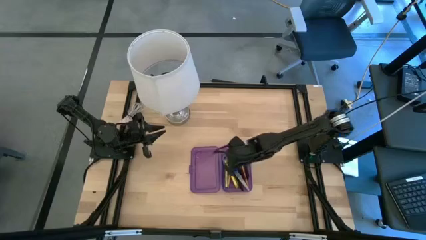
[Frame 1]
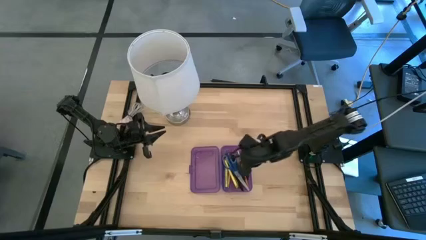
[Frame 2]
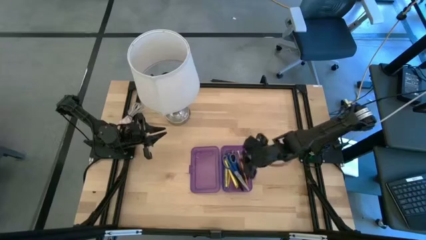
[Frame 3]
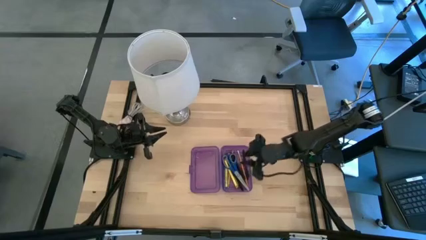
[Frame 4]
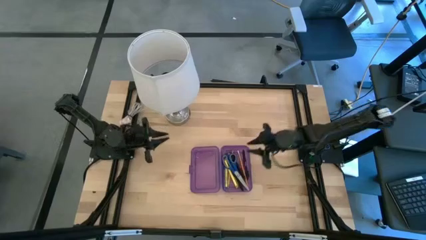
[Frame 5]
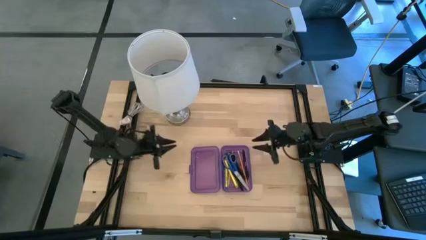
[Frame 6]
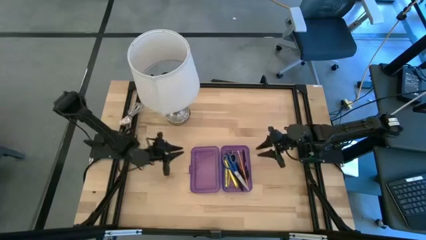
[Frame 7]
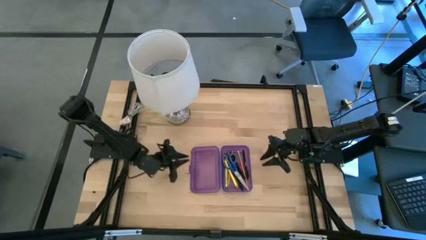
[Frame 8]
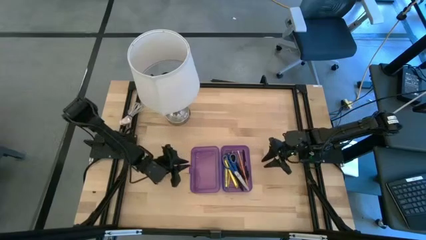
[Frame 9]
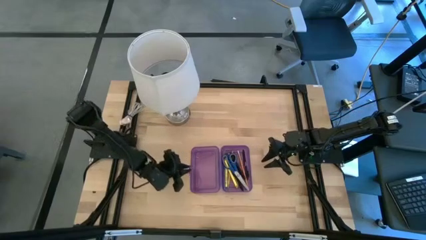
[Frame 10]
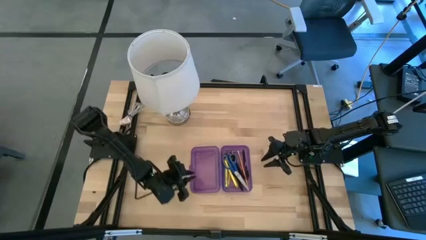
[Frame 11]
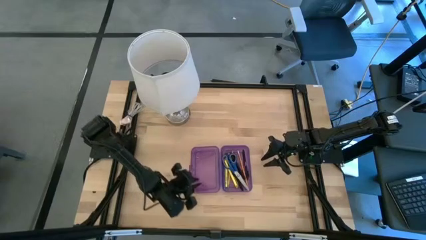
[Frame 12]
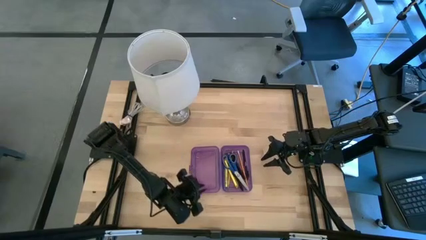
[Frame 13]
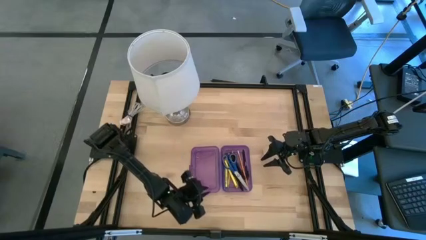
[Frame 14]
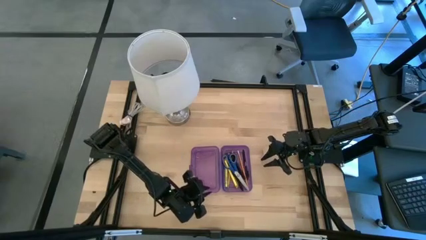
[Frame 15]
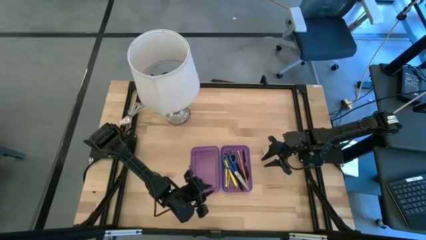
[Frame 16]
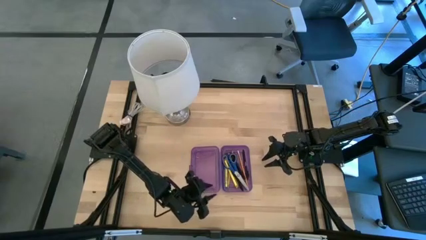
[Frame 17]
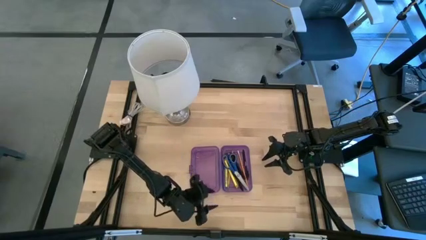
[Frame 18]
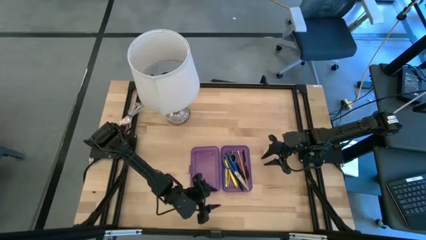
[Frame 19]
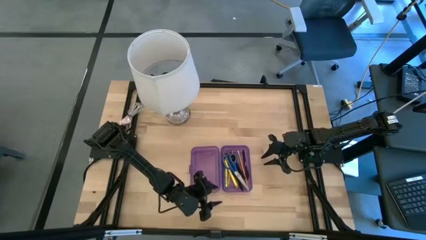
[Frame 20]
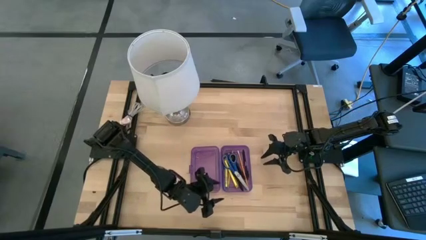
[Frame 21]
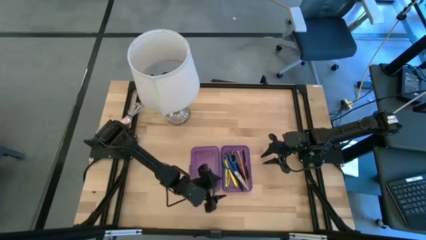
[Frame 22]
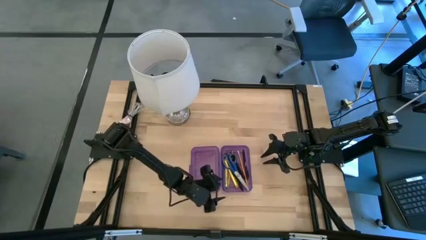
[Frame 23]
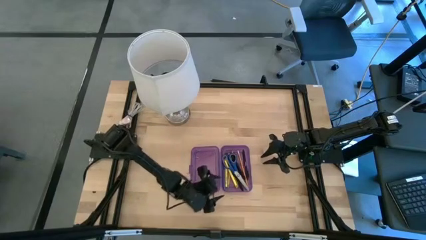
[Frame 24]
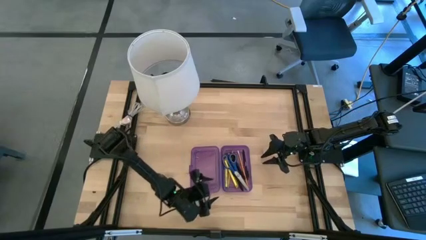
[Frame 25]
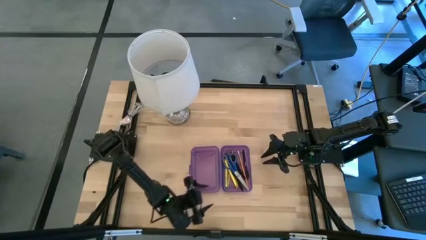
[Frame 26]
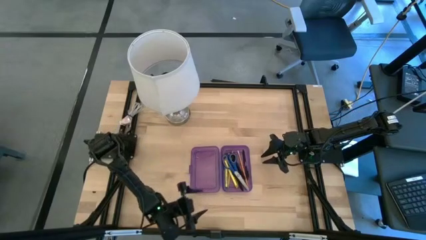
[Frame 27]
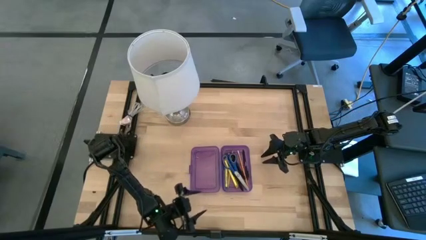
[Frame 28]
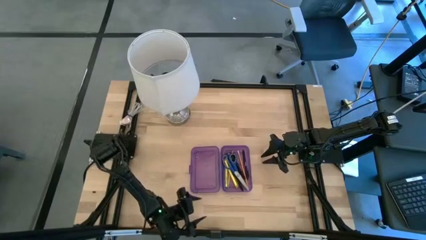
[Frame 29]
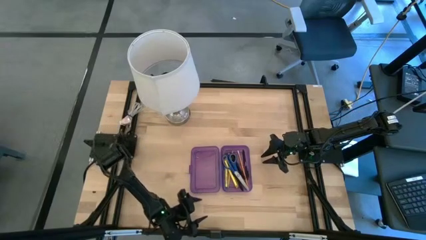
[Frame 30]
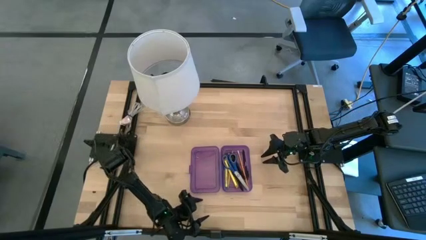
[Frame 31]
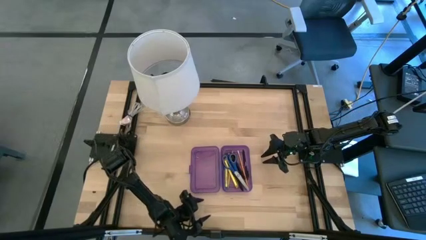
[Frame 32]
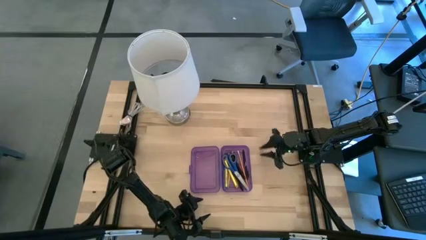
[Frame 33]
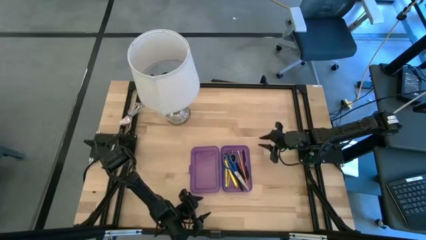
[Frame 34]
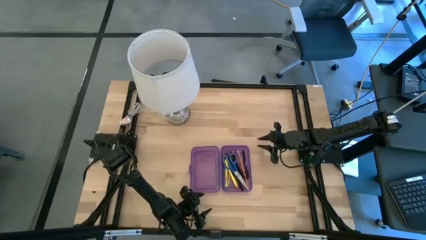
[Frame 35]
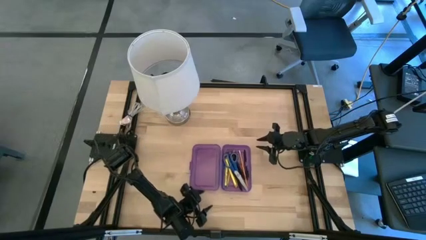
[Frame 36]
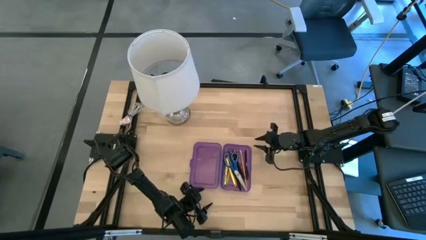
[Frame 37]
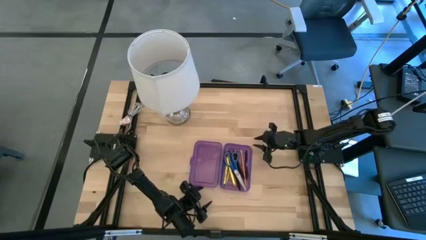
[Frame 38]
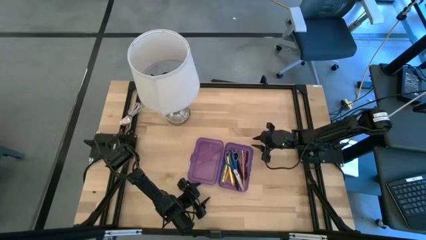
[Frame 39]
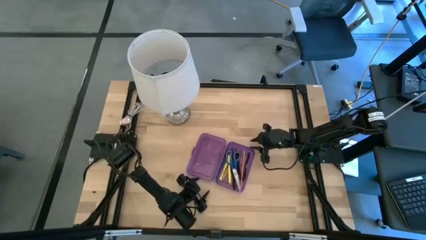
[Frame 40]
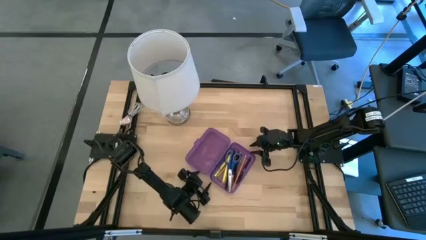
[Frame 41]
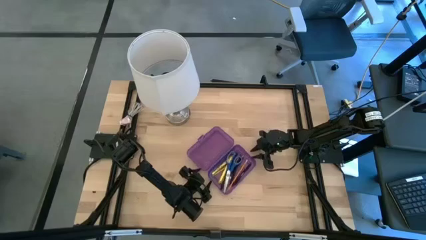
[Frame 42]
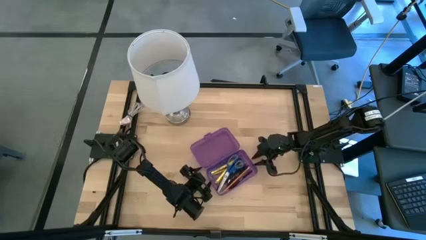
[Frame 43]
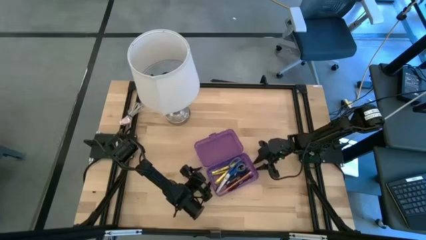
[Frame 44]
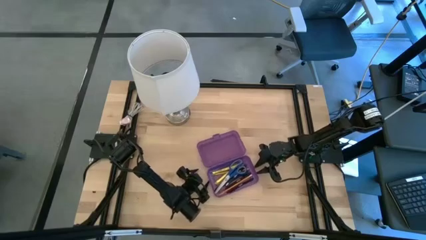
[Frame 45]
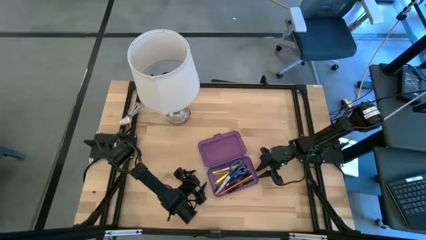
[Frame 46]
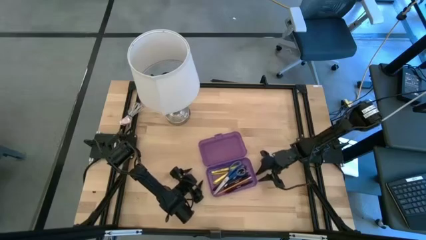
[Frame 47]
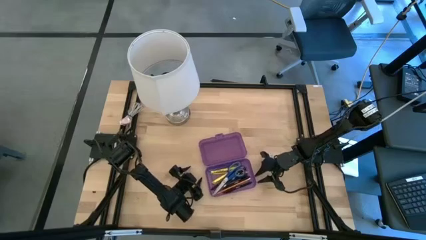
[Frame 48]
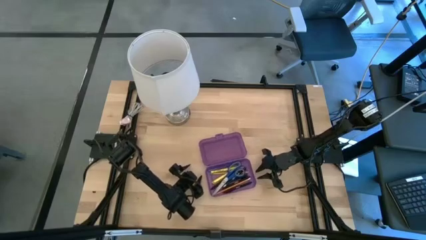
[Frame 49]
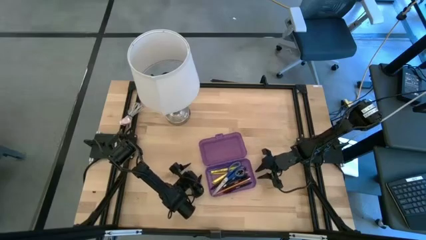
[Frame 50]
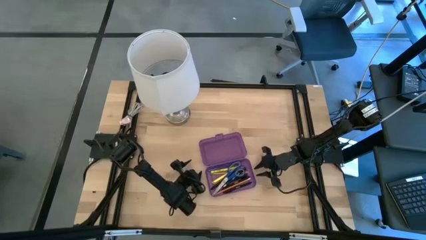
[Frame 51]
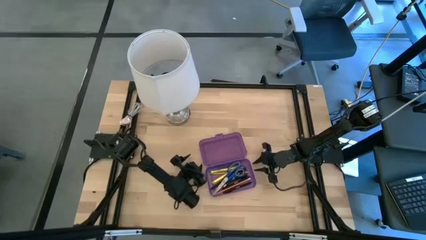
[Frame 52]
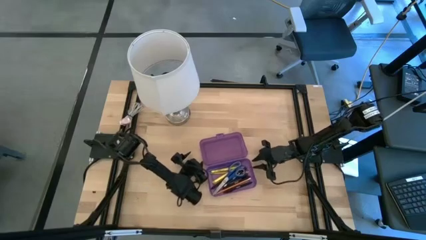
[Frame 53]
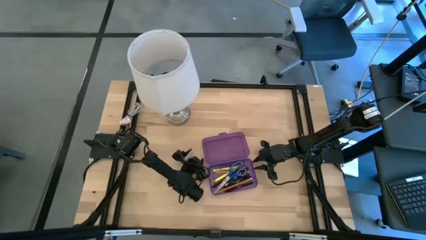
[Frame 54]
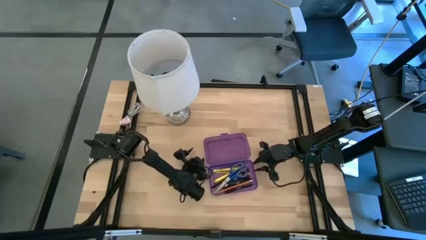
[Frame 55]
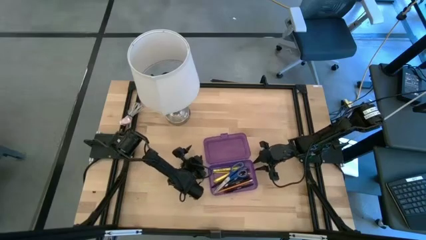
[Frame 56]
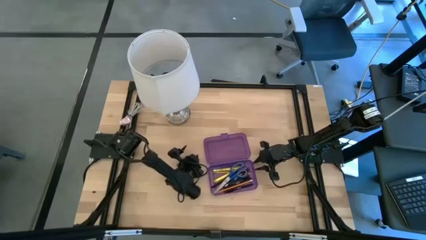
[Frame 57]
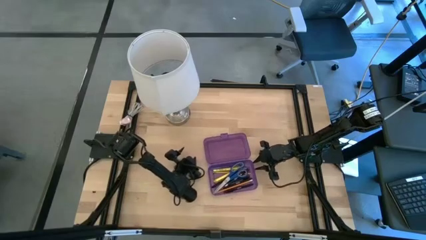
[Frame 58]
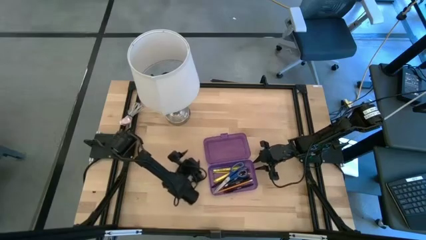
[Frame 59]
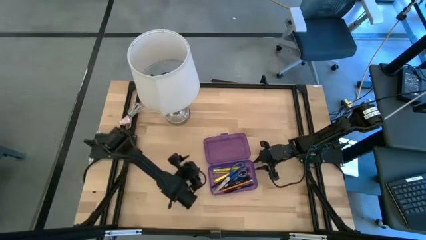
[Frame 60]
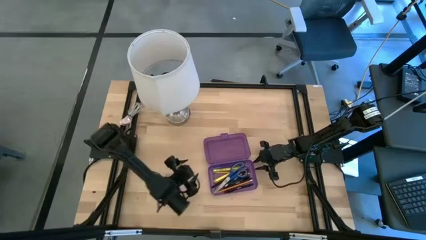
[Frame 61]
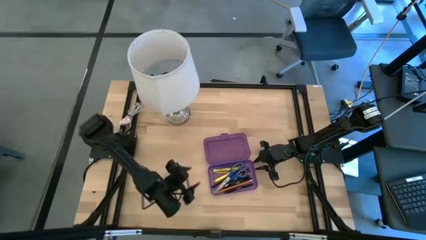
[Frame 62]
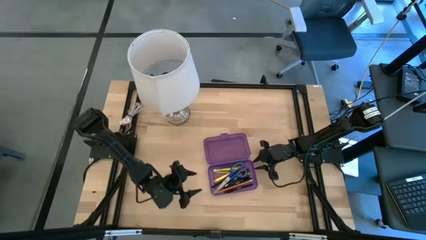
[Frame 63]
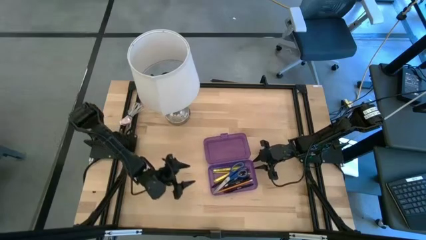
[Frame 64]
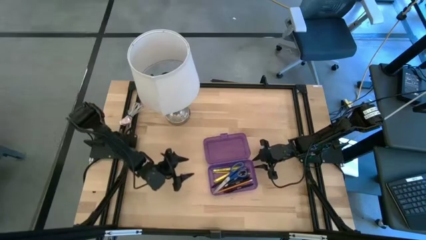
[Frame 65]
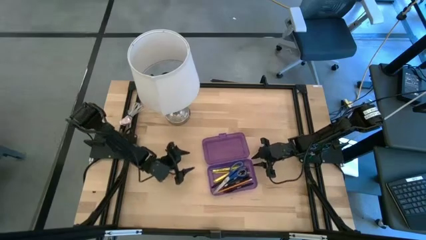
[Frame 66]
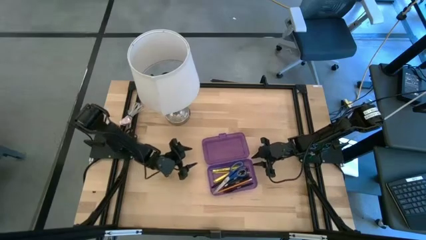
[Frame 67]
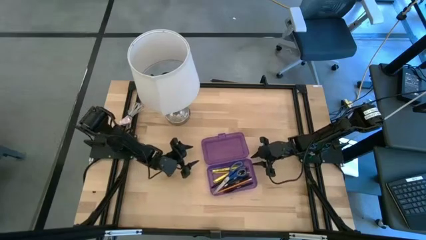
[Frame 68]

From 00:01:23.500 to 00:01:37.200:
Task: Pick & place school supplies into a supply box
Close the purple supply box

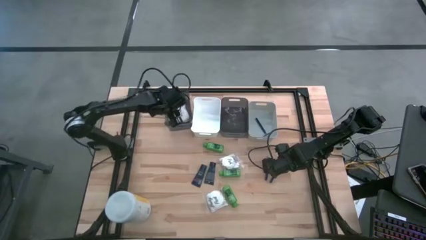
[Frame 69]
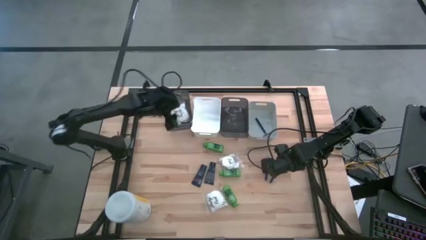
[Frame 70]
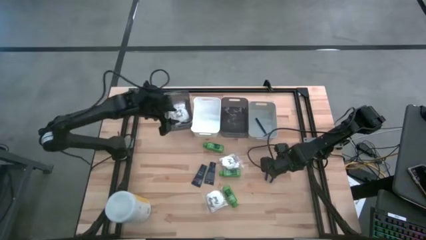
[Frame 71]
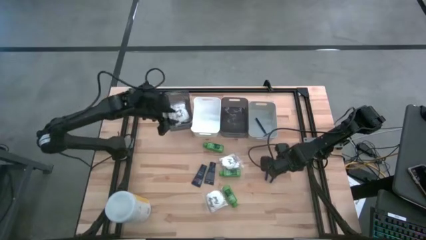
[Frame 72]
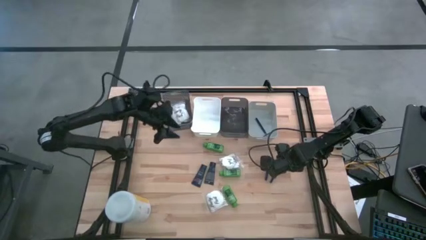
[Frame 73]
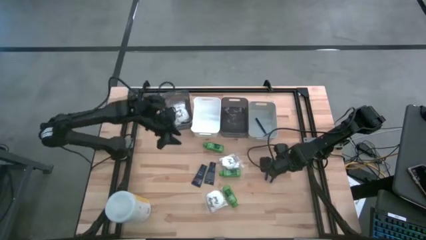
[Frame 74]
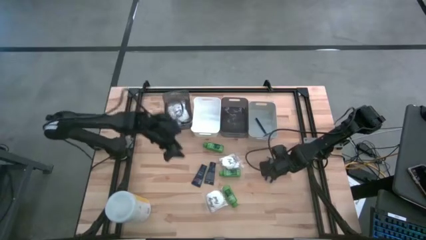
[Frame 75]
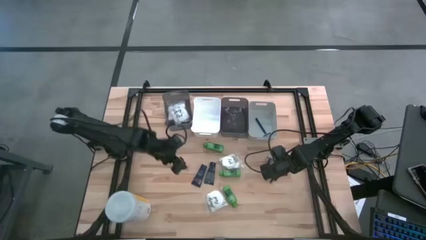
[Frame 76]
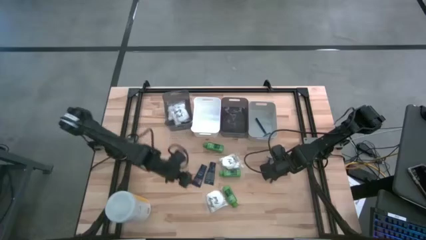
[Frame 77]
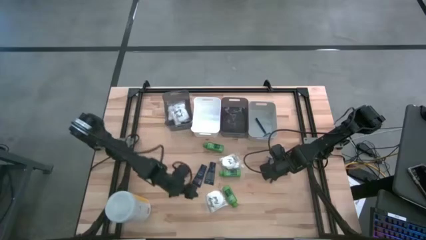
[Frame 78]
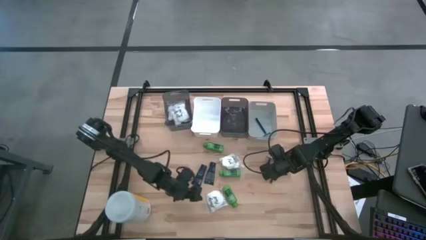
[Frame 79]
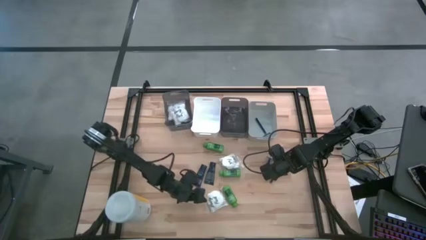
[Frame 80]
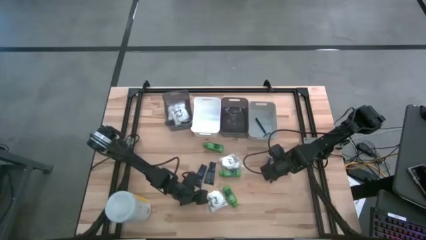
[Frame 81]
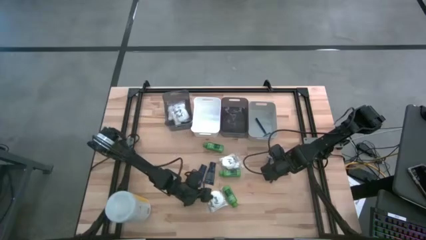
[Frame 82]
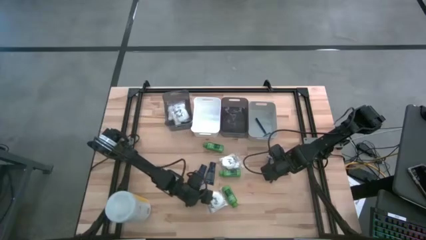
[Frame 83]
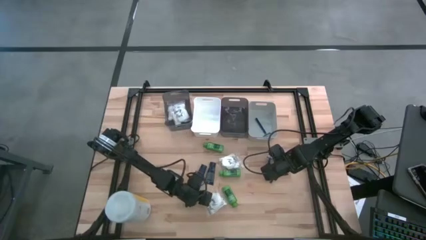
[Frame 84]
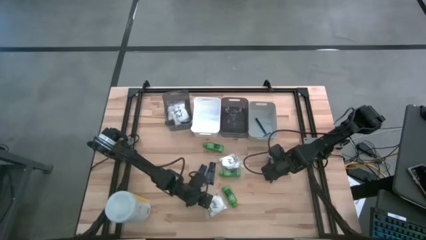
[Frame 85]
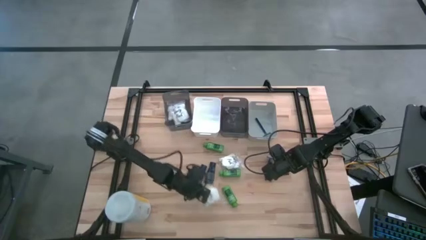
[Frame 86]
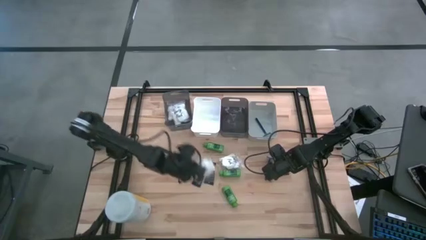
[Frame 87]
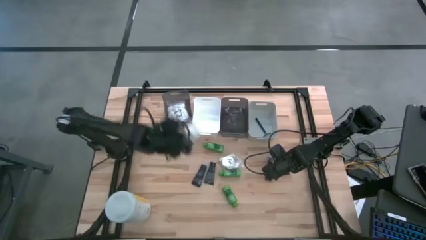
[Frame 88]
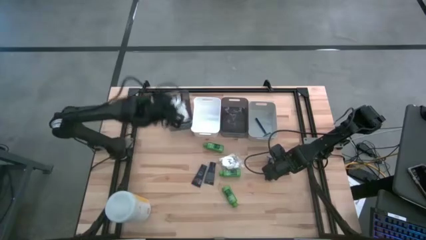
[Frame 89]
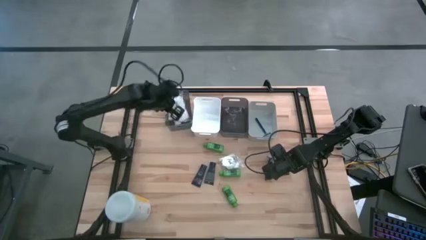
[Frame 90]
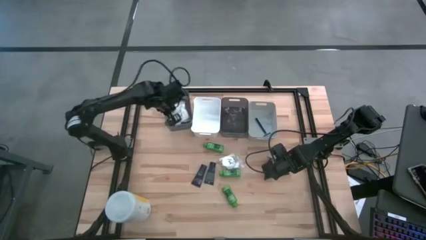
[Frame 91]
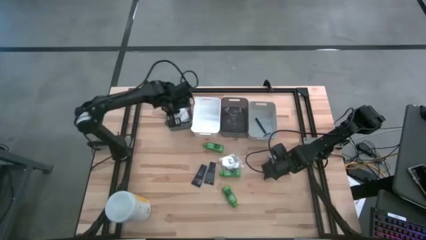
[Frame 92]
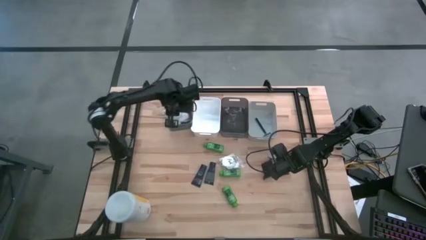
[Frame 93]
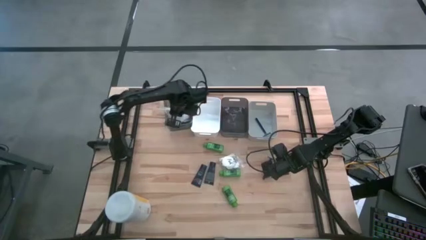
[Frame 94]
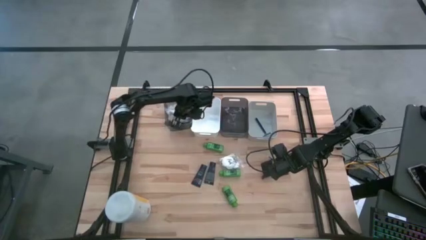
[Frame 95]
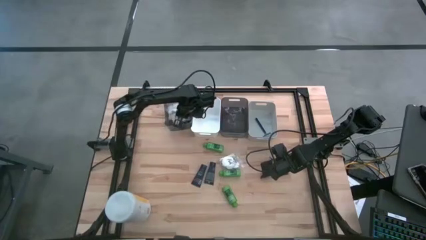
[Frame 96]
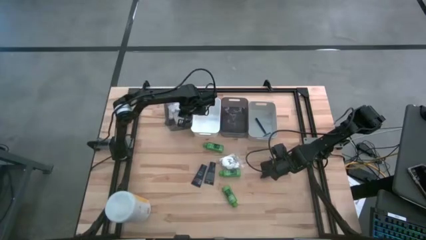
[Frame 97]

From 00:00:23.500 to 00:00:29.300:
Task: Pick & Place Travel size toiletries
Put the bottom cotton pack into the left black bin
